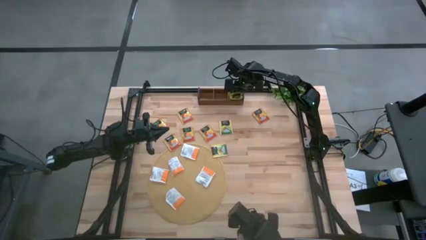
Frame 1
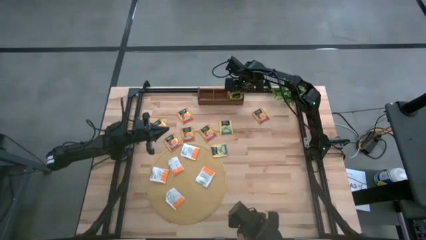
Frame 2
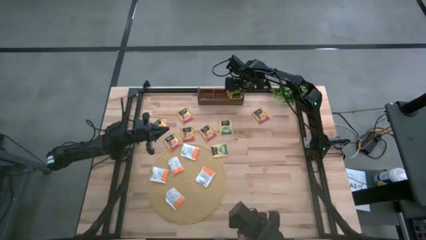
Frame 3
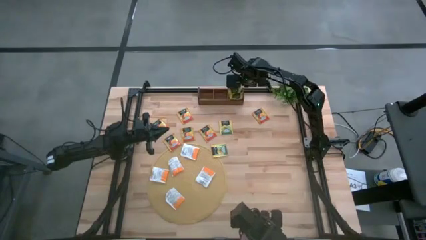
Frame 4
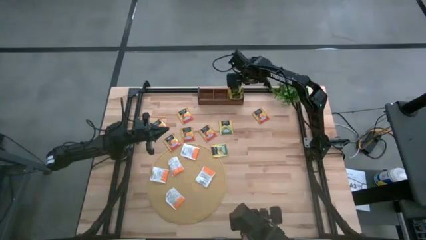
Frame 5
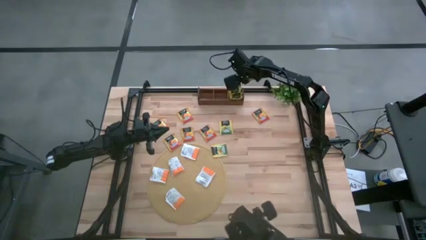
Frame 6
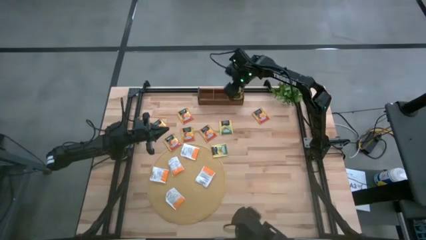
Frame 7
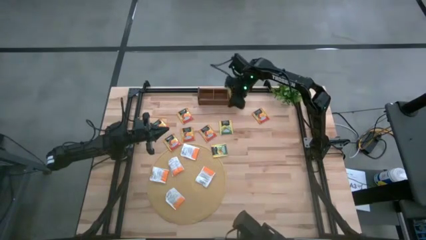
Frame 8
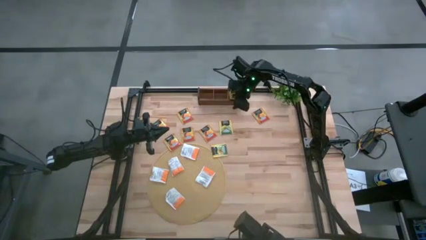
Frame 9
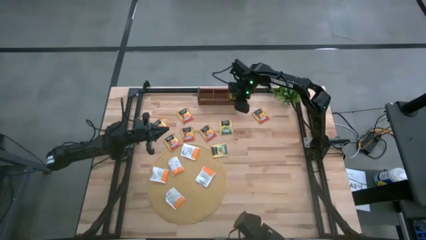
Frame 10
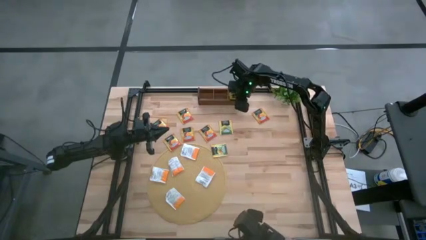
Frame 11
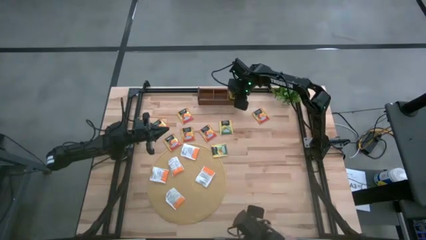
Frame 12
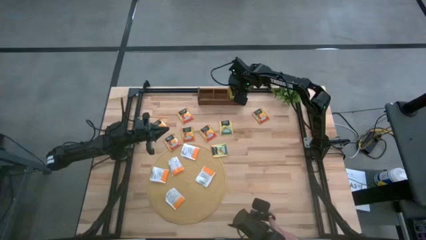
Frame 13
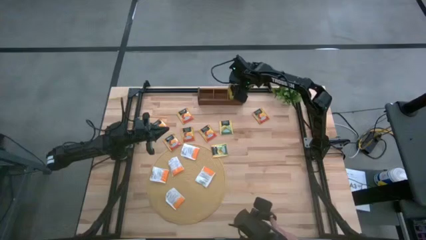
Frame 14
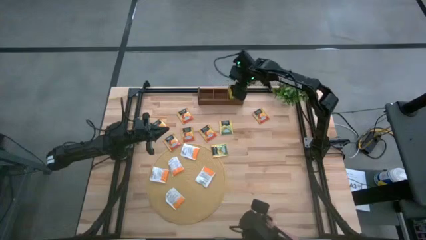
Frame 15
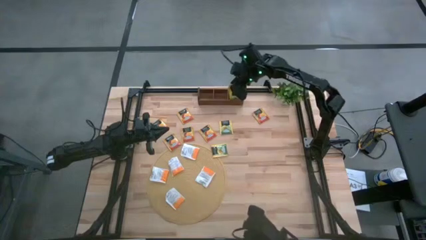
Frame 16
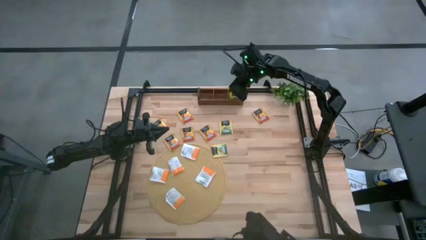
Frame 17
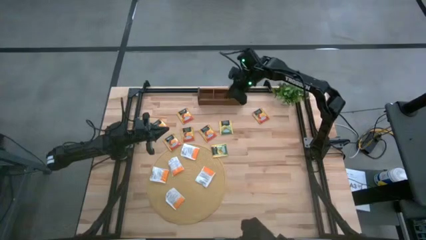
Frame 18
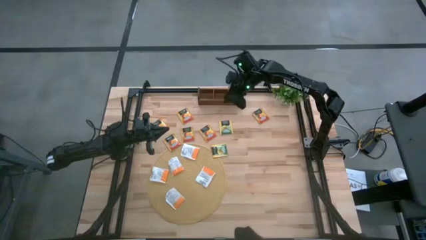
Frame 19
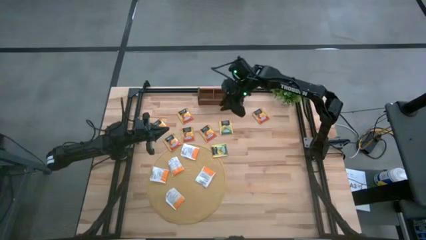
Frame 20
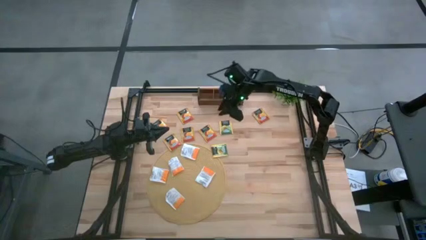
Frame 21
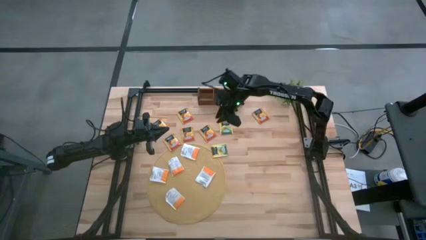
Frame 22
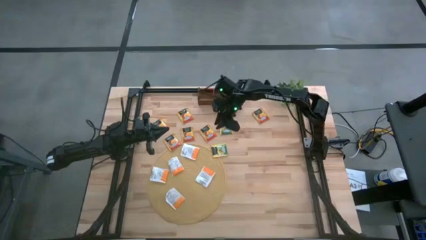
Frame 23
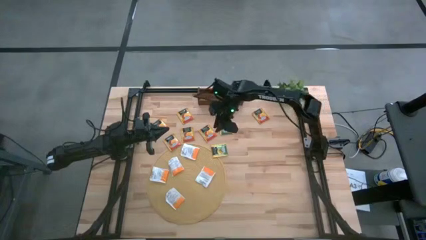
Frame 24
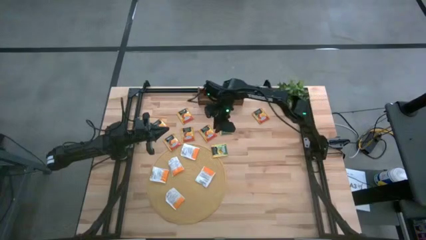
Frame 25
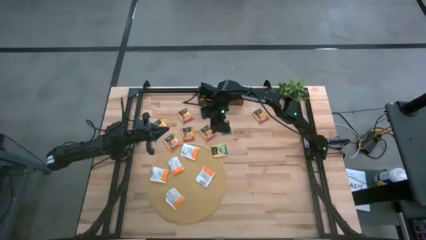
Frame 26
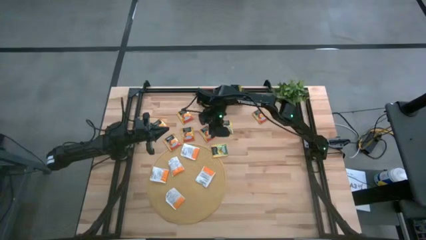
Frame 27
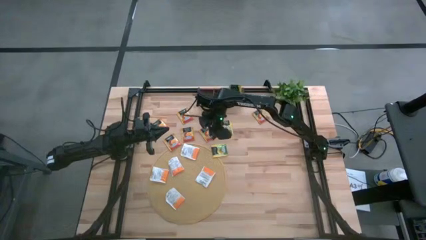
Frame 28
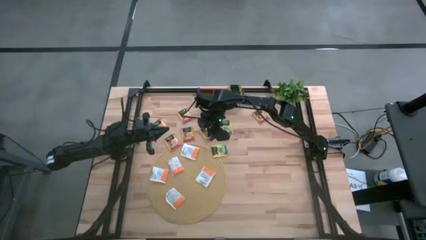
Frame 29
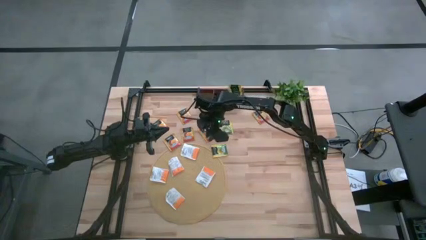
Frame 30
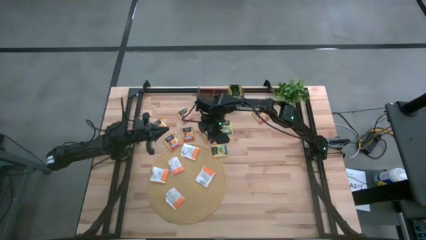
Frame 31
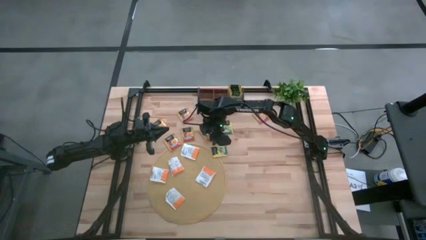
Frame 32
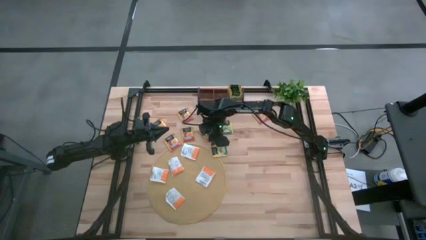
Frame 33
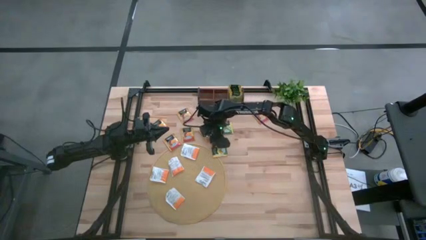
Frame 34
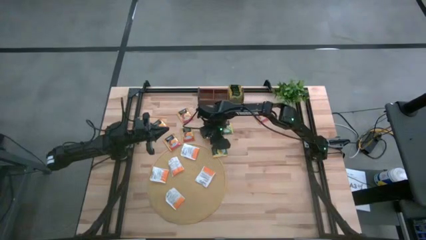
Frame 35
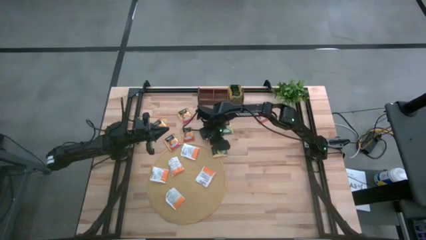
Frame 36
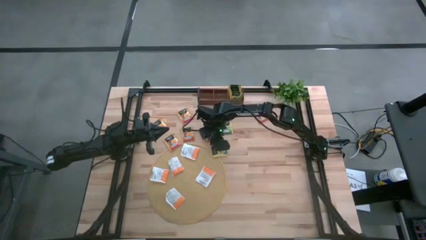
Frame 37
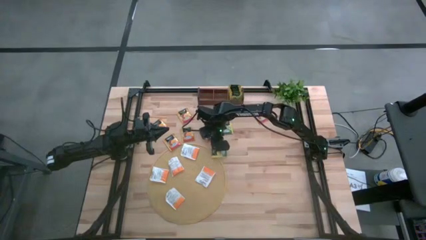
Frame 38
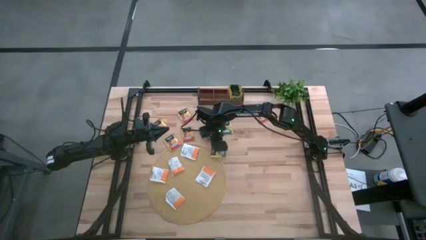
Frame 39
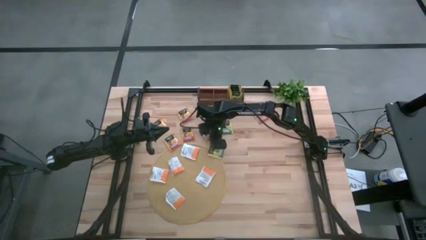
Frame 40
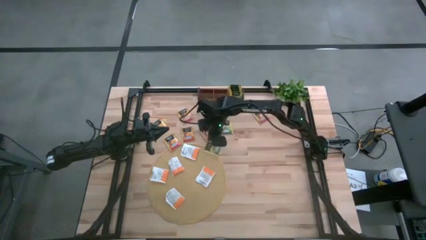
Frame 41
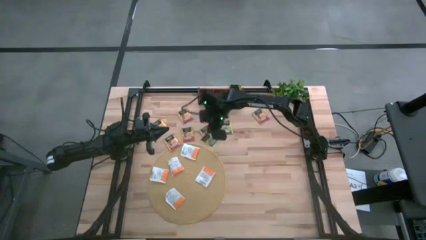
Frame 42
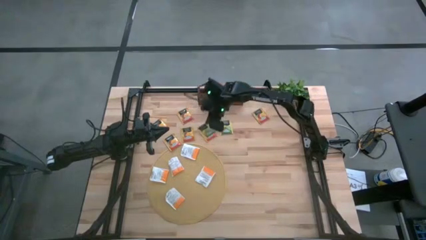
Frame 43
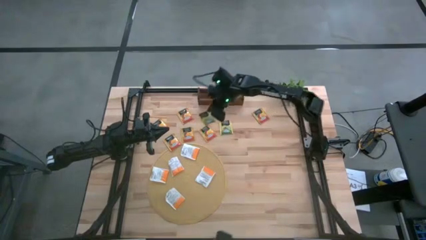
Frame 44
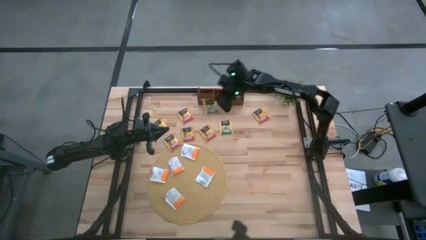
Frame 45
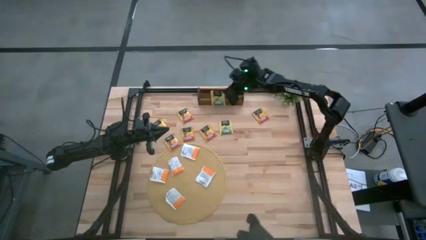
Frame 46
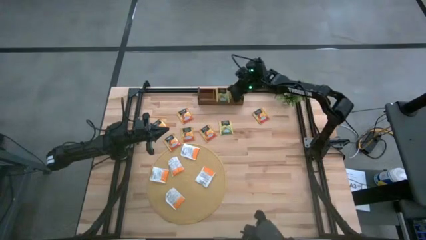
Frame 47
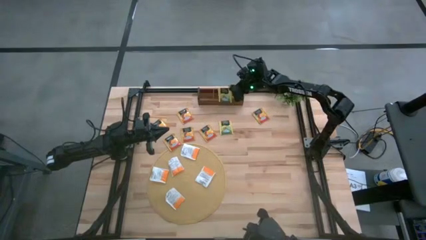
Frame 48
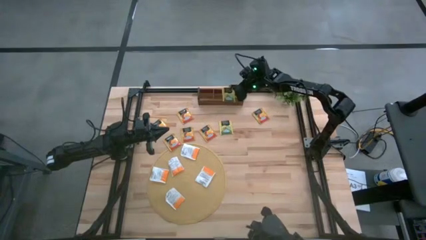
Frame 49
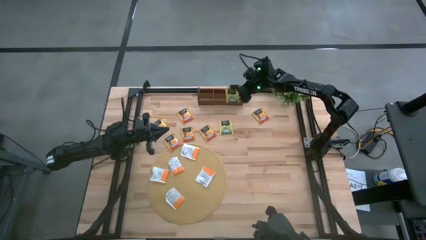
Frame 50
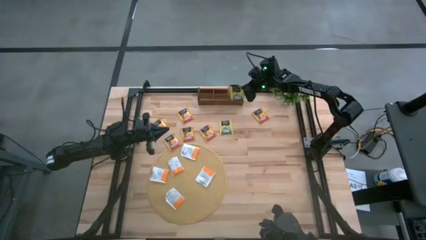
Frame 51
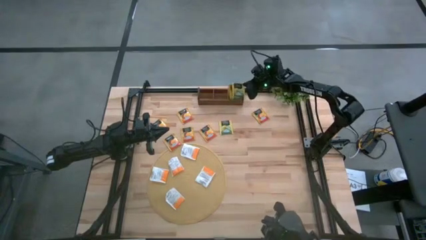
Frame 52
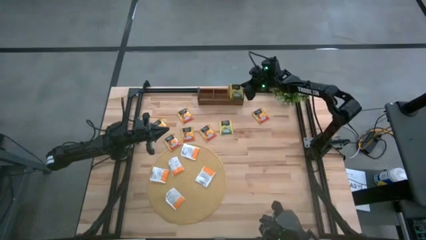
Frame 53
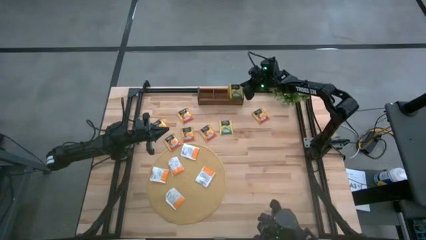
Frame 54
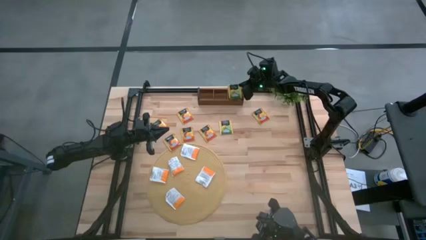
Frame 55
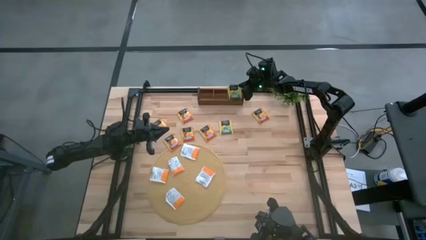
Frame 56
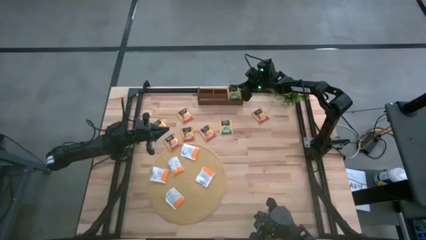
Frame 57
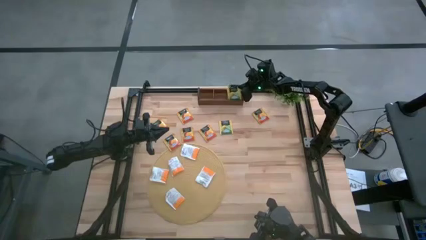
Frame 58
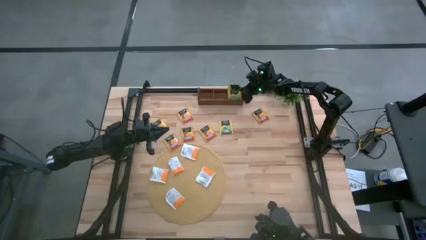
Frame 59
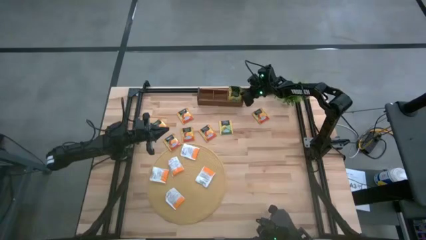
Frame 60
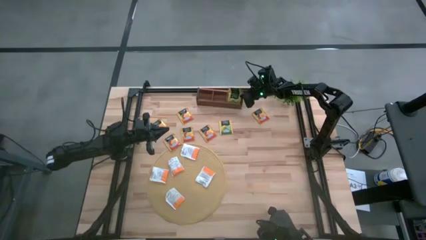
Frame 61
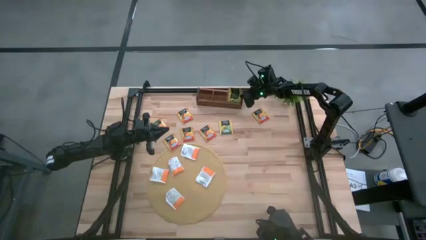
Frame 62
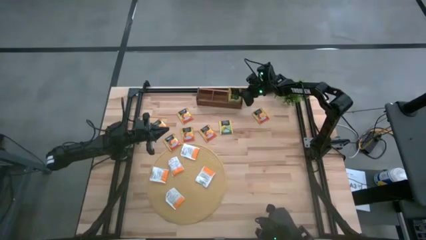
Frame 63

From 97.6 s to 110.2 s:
Task: Pick & Place Tea
Put the left green tea bag into the right slot of the wooden organizer

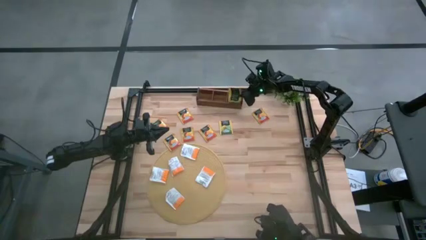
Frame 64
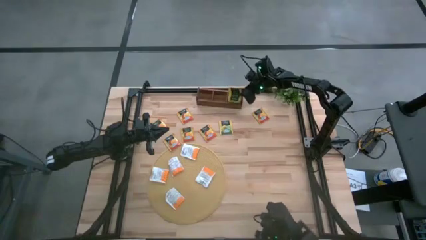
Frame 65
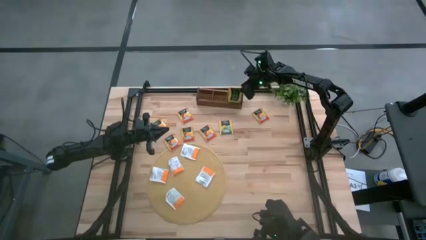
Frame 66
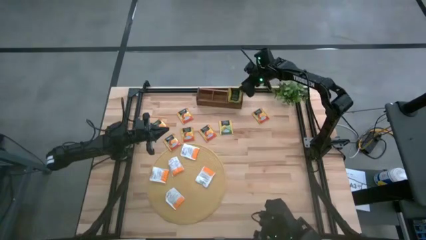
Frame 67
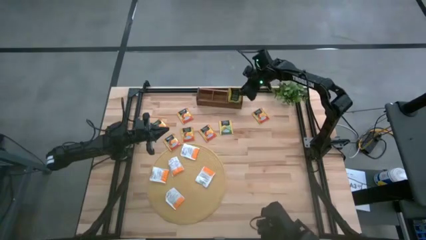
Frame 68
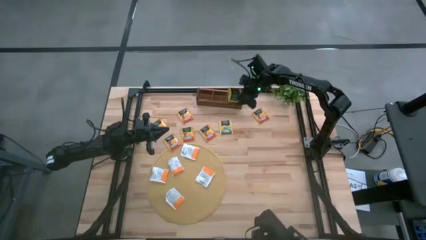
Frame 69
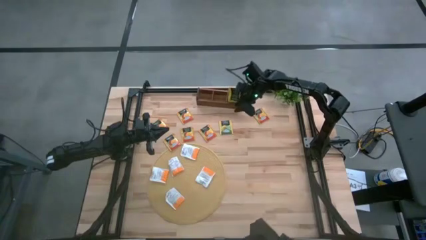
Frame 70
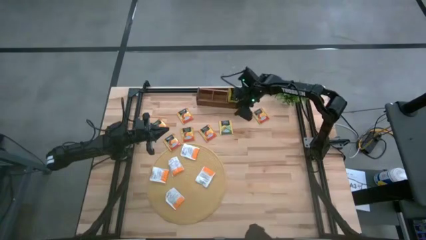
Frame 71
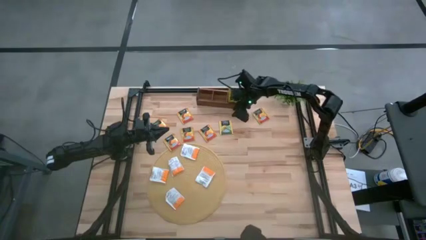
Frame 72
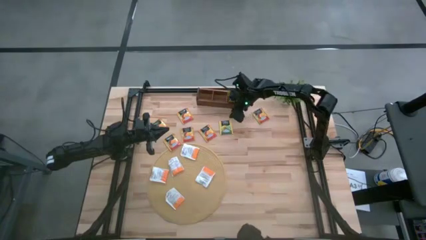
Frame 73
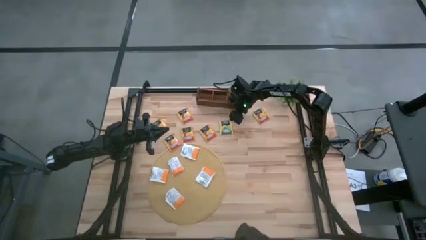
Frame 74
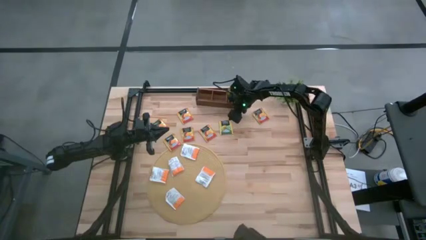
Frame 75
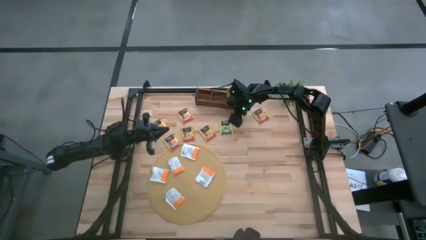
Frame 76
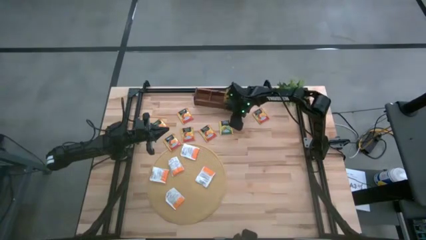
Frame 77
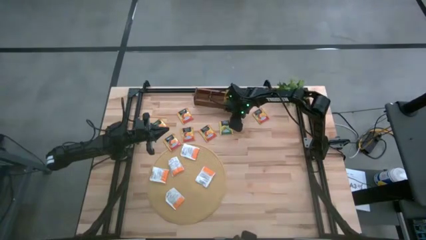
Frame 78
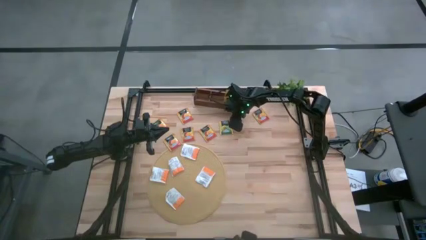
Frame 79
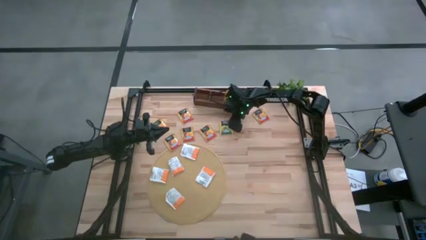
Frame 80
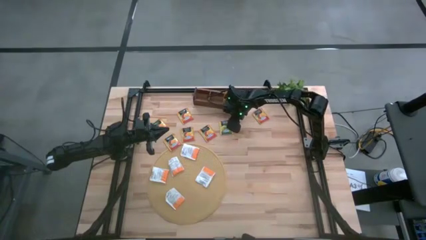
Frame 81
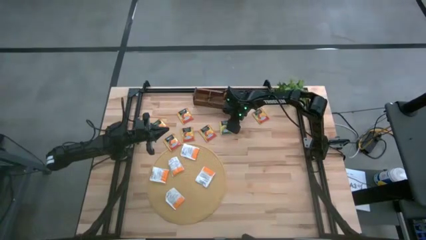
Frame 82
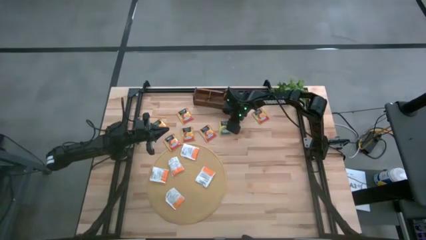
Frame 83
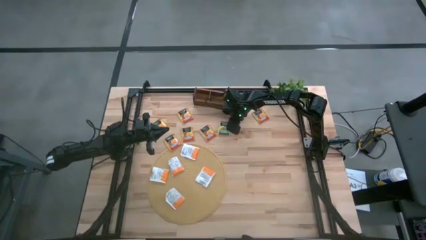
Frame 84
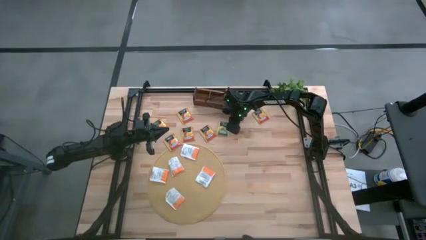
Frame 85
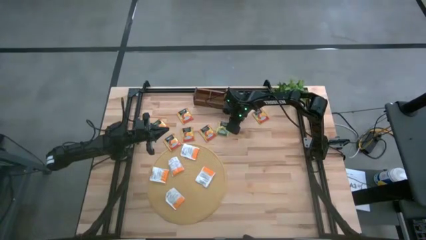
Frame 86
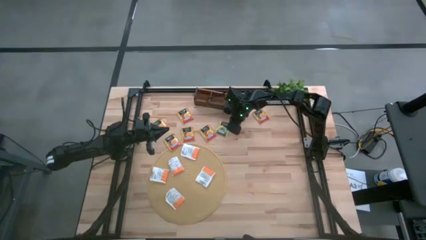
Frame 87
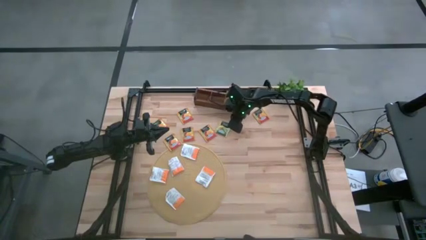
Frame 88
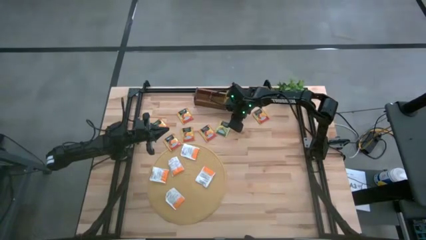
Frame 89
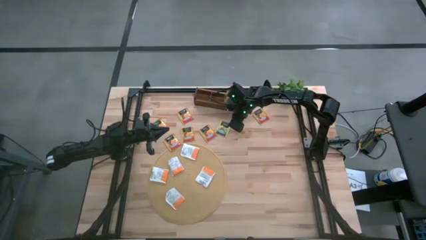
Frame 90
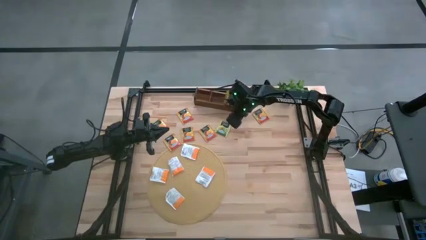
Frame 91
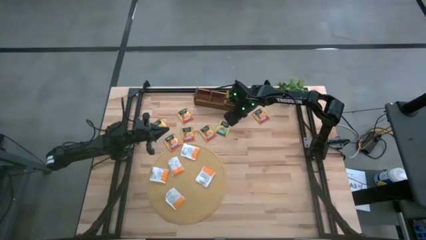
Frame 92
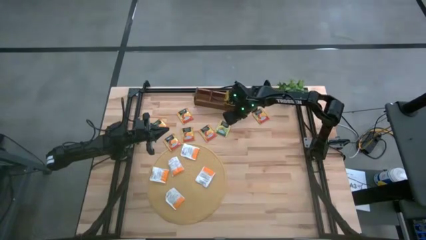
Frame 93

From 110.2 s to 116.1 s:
Put the green tea sachet into the right of the wooden organizer
